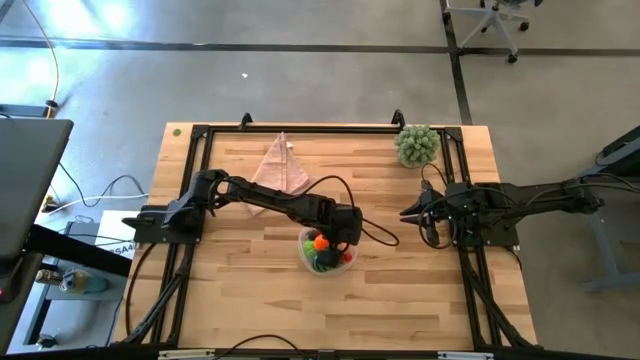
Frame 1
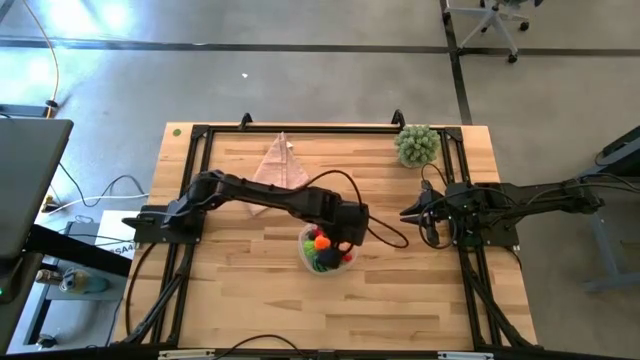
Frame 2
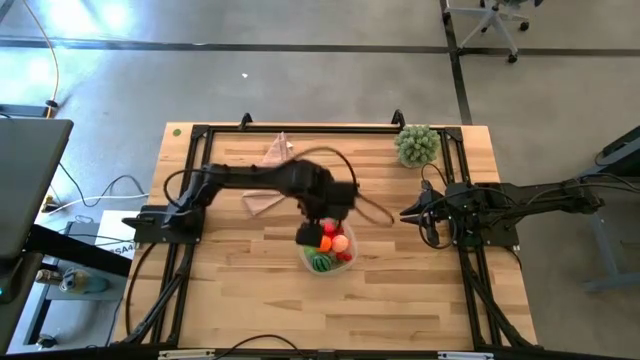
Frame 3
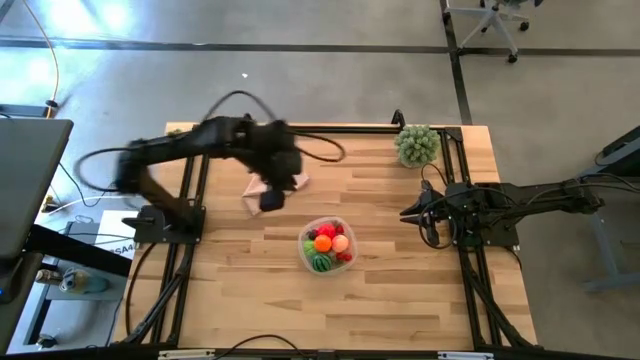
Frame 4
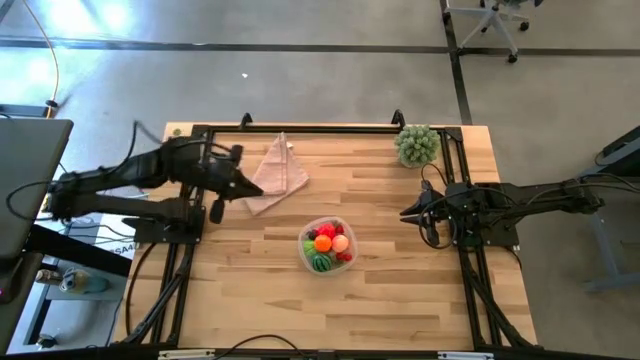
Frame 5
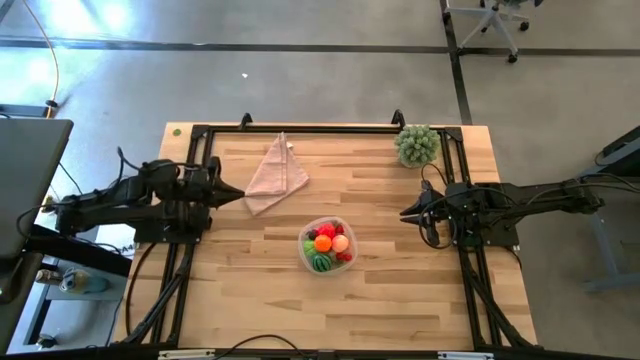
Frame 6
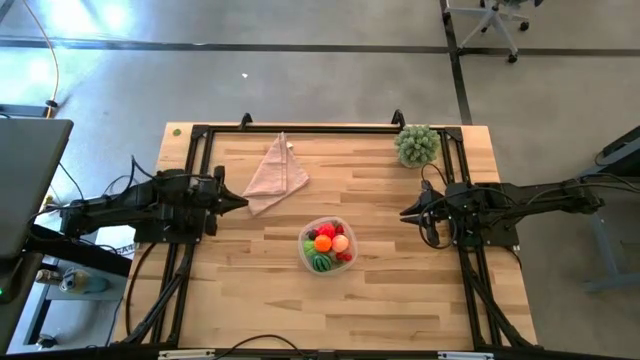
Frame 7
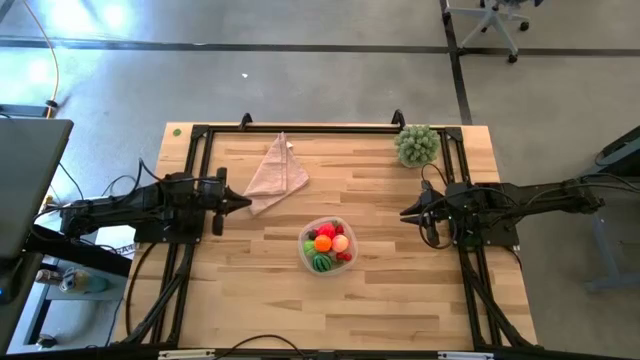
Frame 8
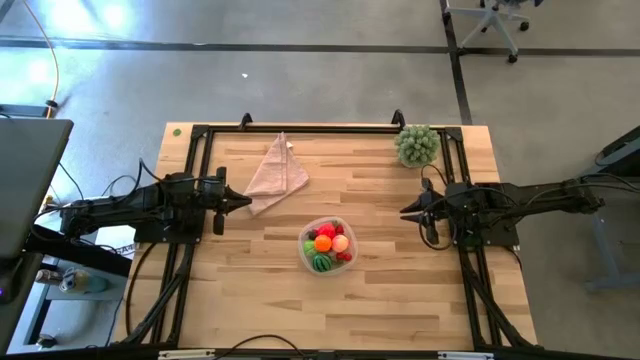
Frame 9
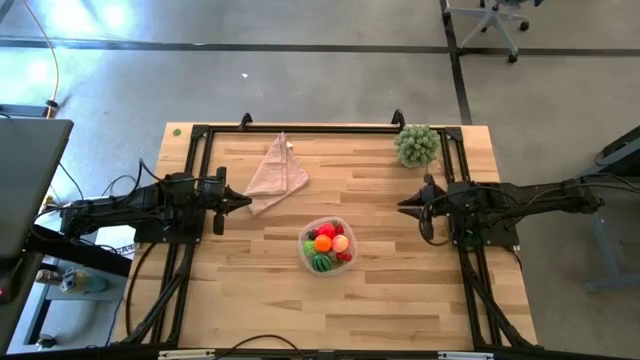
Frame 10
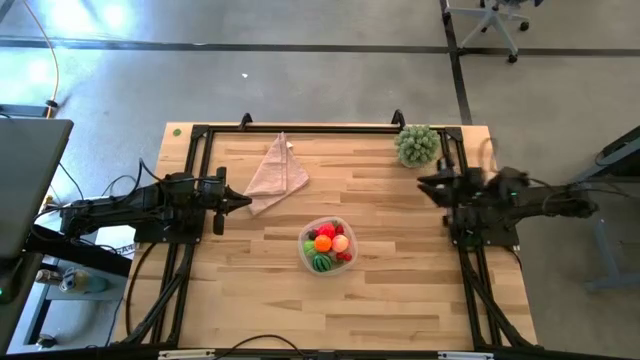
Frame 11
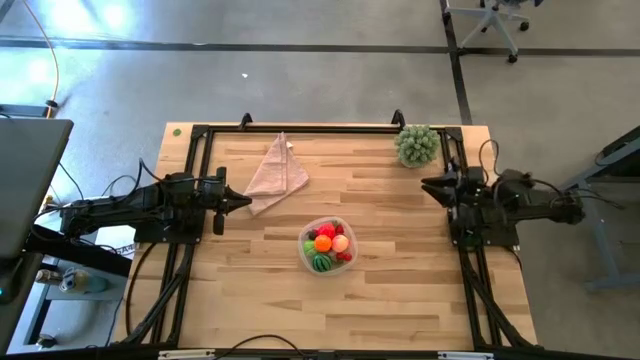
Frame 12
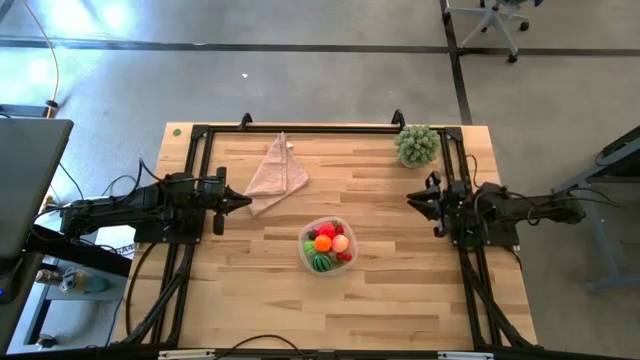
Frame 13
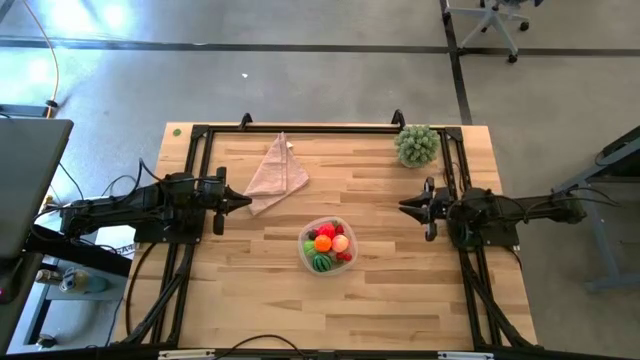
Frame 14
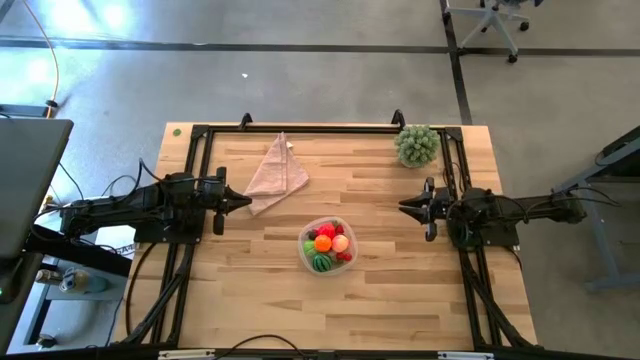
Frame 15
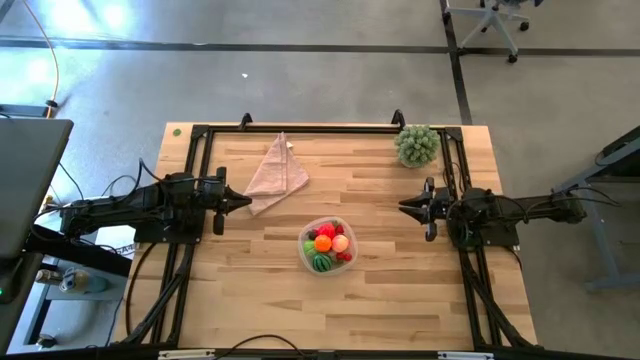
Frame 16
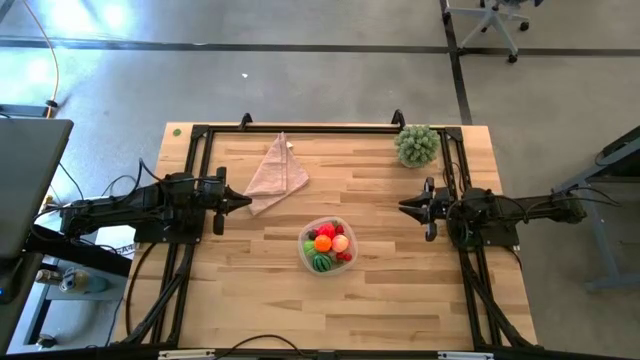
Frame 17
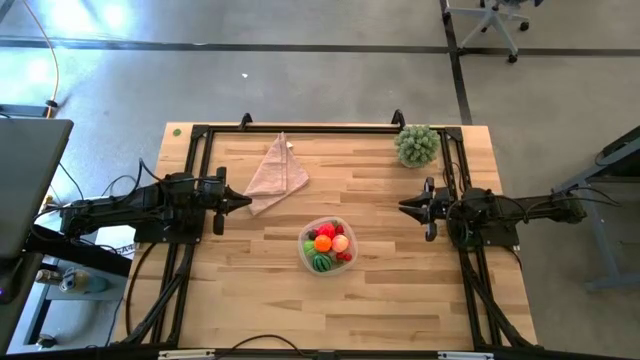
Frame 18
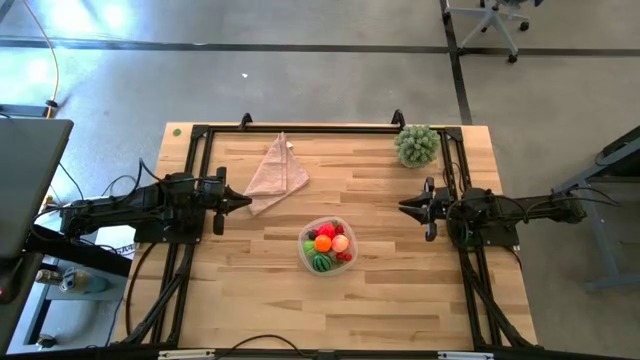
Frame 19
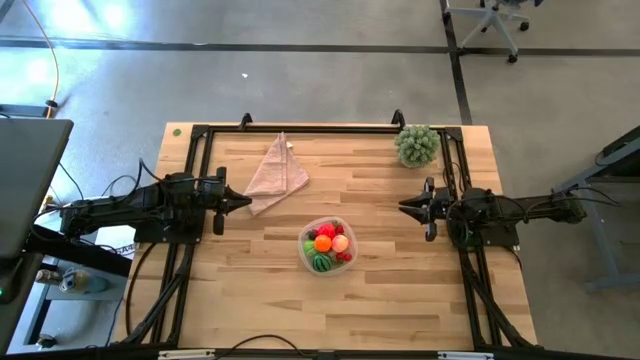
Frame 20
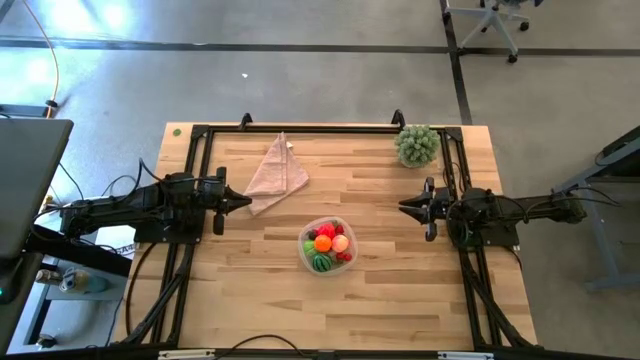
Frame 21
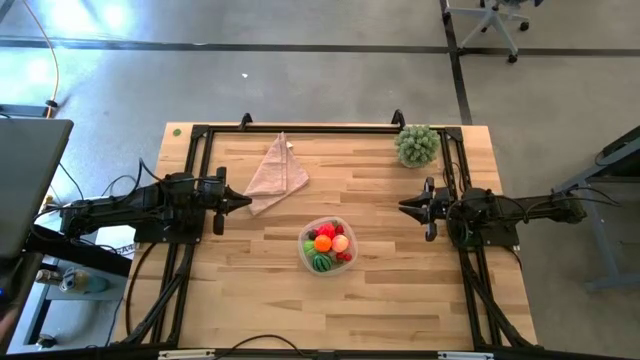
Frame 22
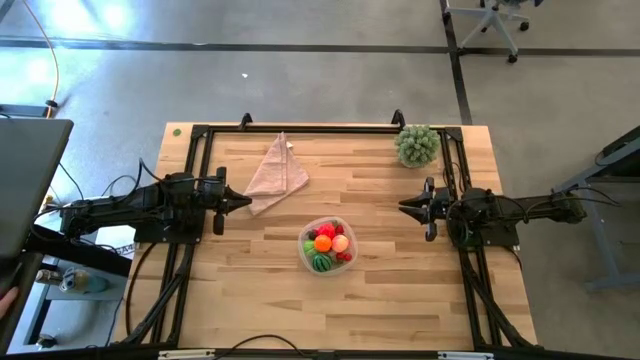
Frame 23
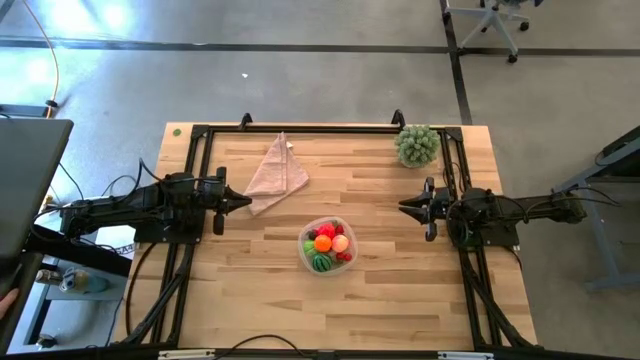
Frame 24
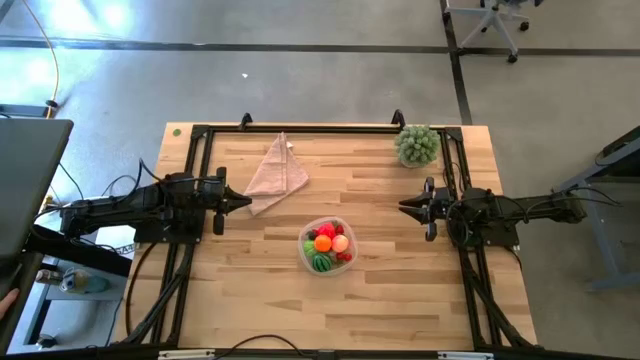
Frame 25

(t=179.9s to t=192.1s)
Task: Pick and placing Produce into tupperware
Return to Home Position

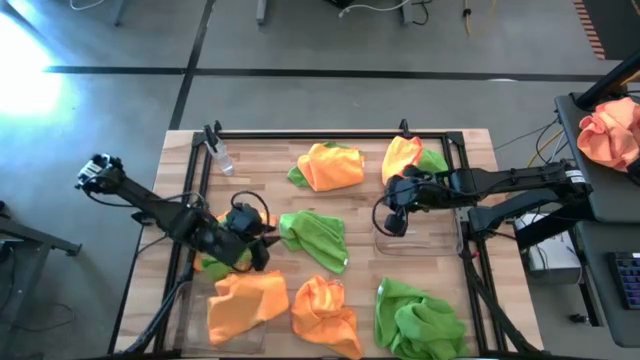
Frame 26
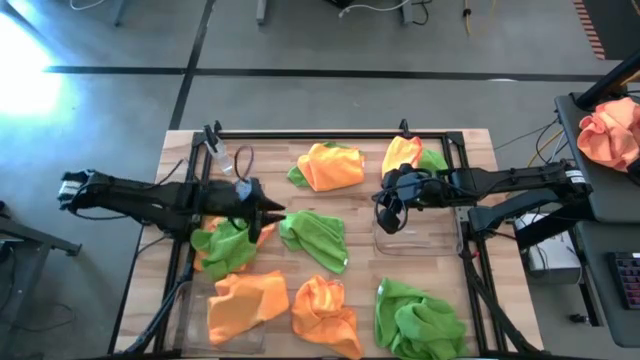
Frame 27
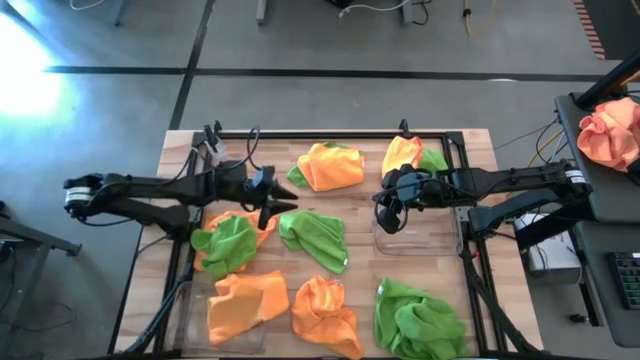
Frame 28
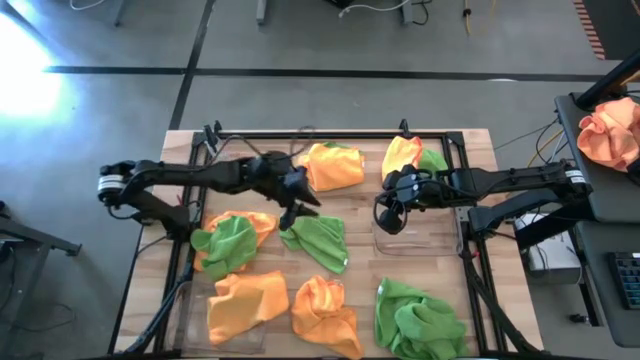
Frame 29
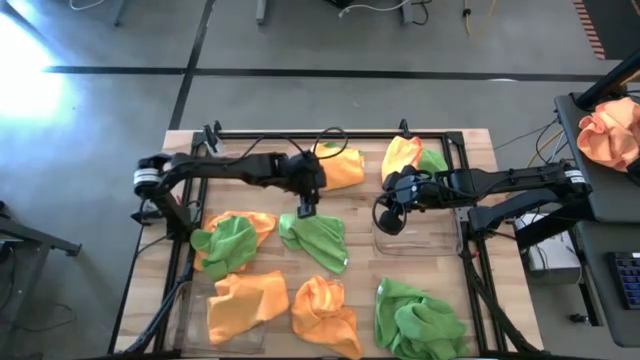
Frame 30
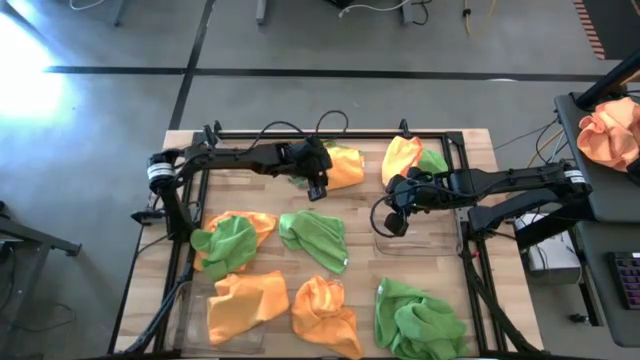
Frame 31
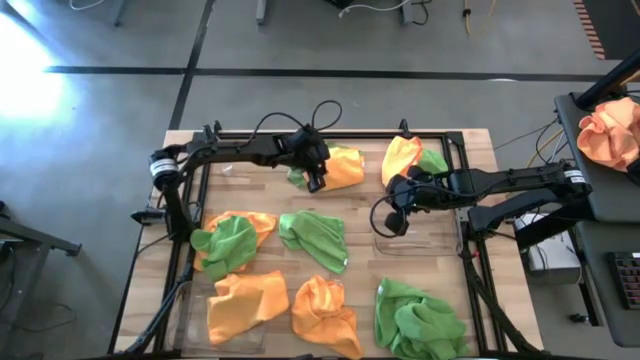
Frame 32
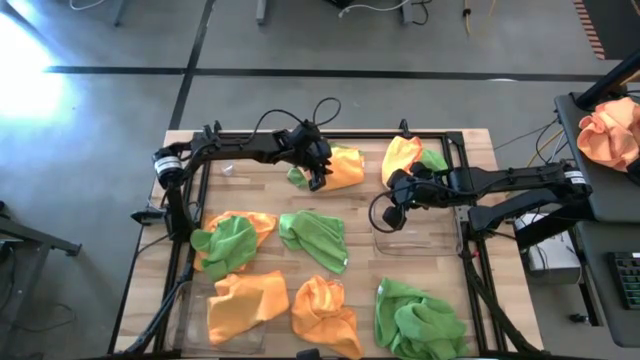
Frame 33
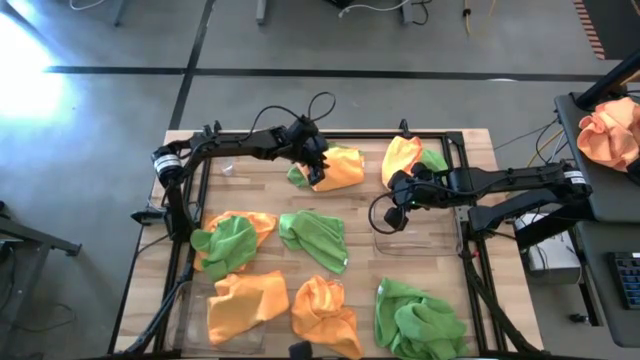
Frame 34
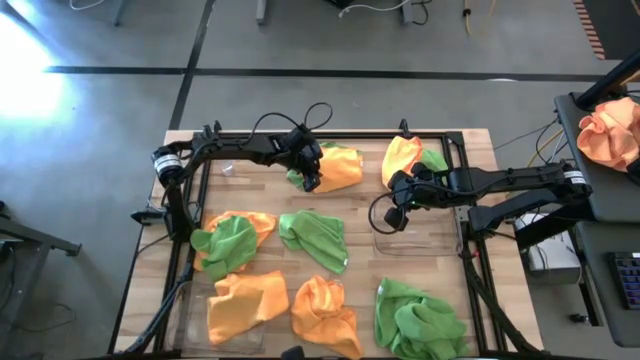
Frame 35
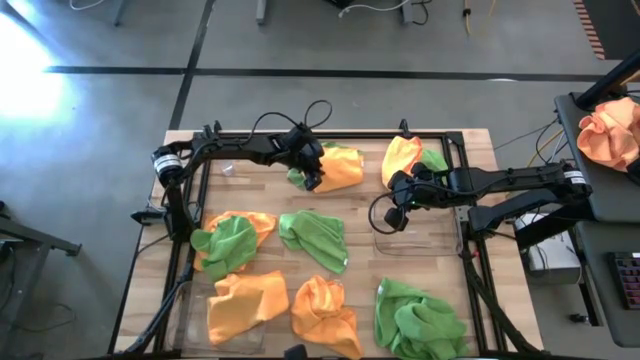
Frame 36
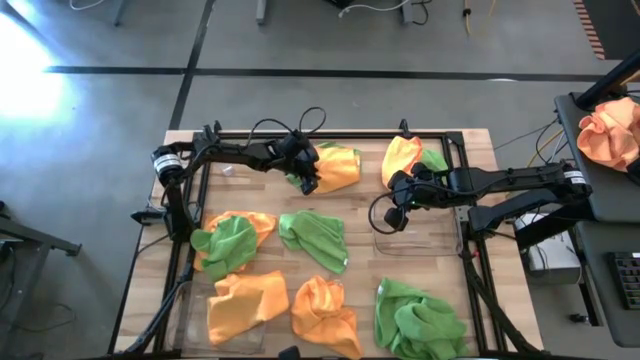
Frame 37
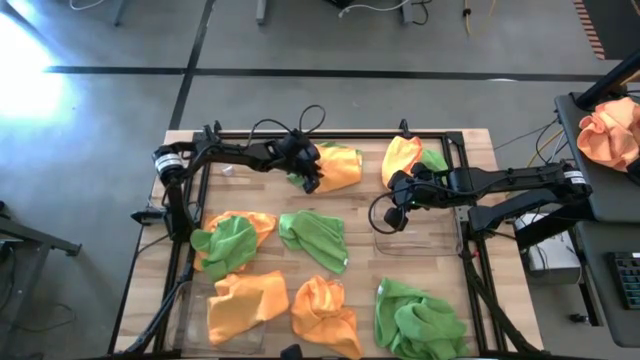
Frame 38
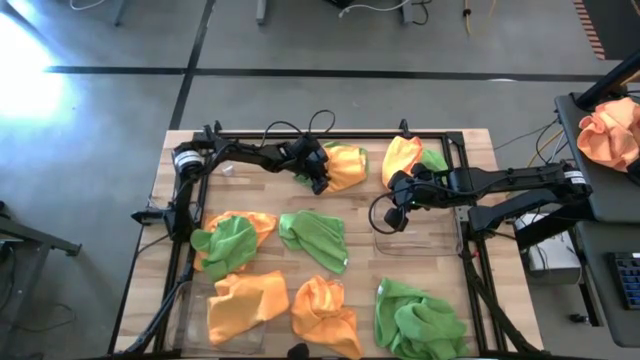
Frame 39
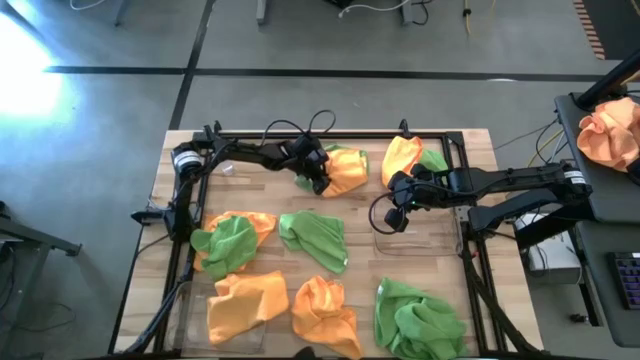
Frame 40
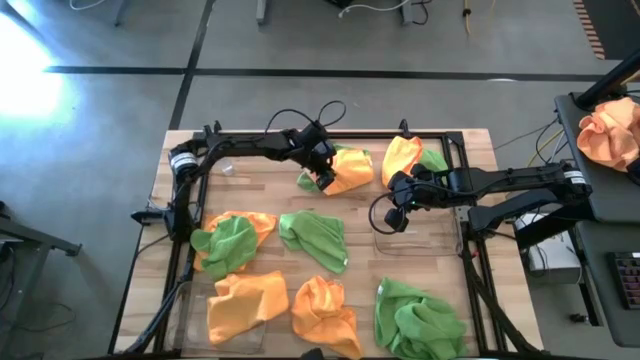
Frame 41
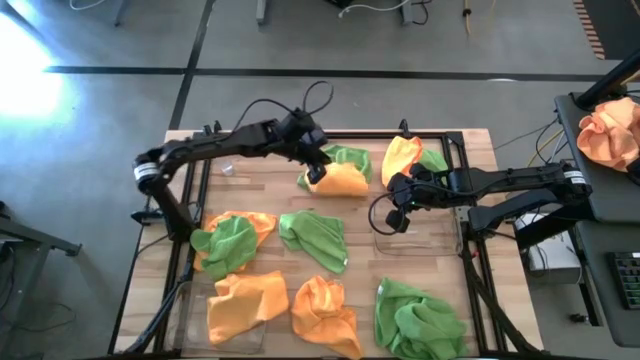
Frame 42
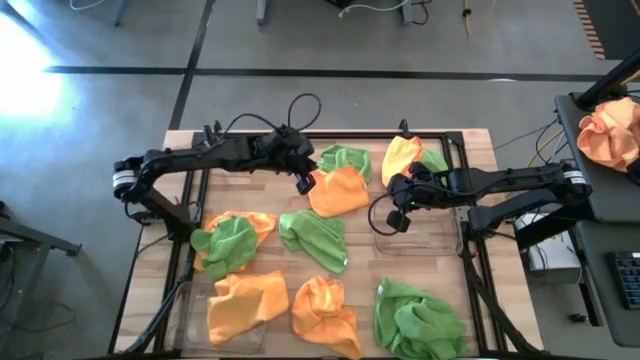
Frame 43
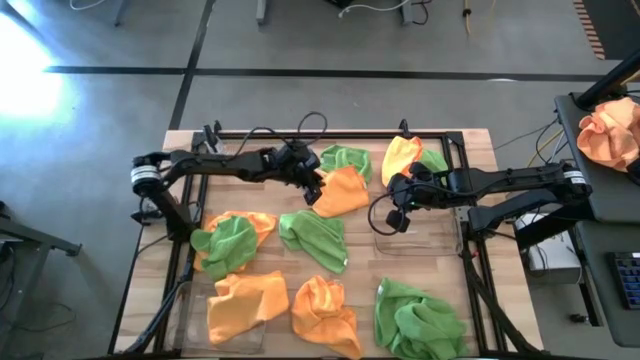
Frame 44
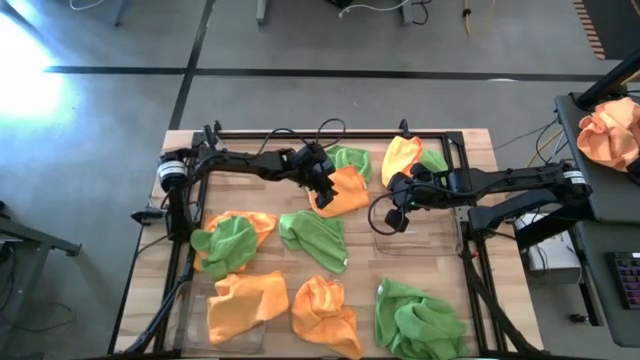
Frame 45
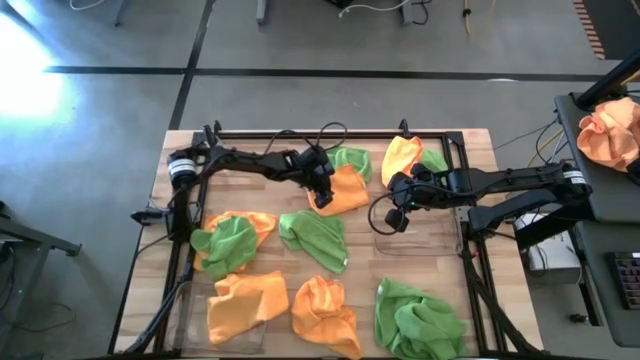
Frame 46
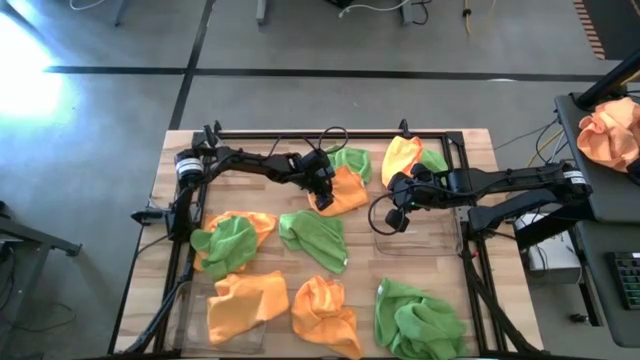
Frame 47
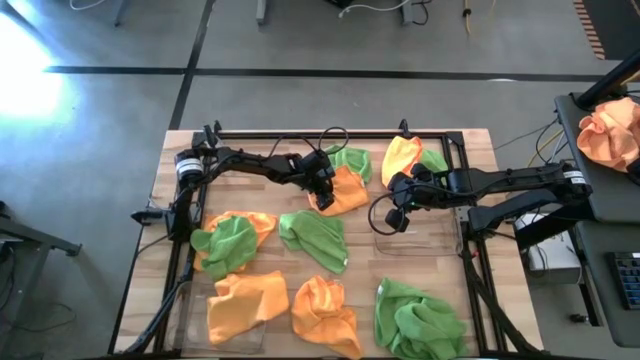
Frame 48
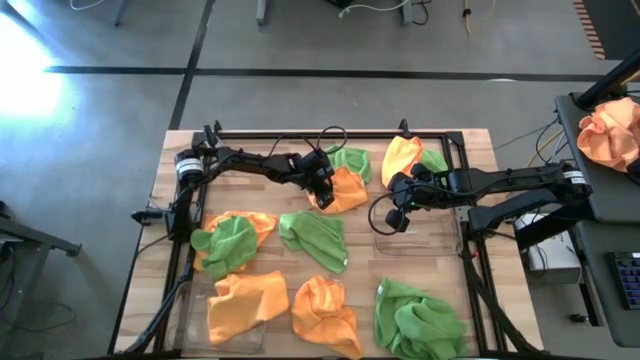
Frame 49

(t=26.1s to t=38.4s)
Task: Sort microfiber towel by color & place in baskets
Put the top center yellow towel into the left transparent bin
